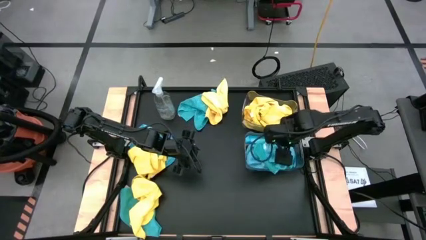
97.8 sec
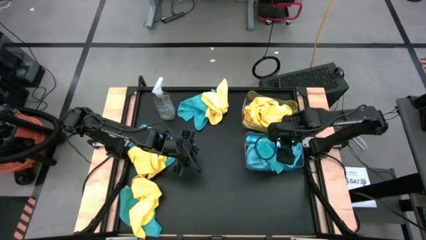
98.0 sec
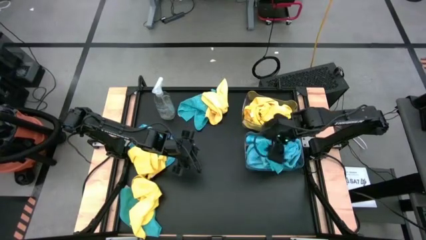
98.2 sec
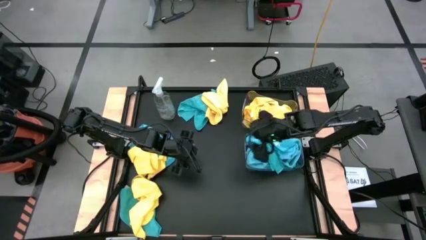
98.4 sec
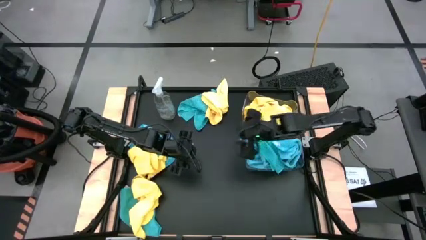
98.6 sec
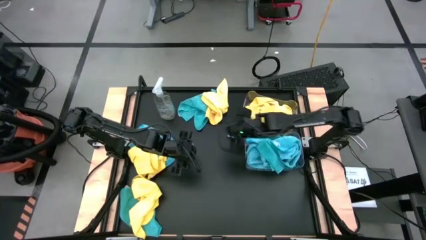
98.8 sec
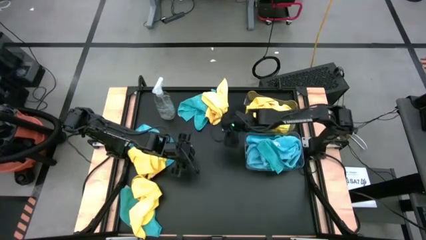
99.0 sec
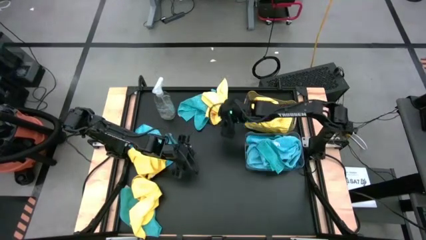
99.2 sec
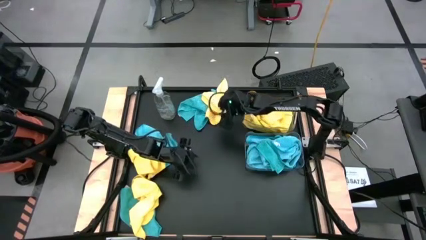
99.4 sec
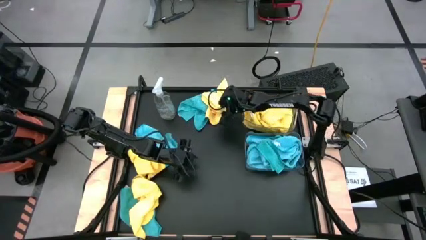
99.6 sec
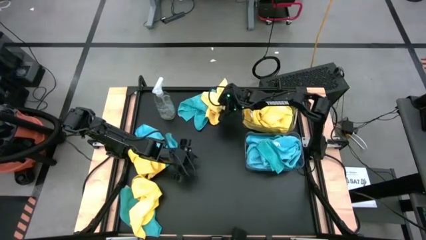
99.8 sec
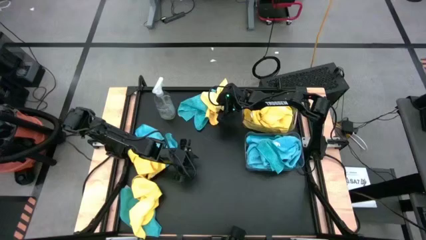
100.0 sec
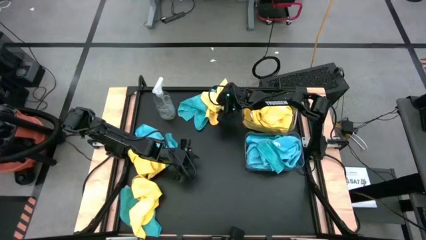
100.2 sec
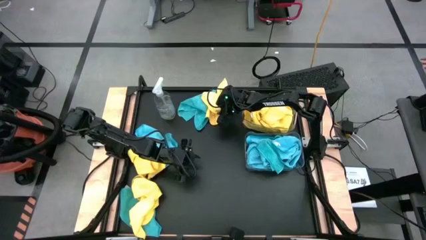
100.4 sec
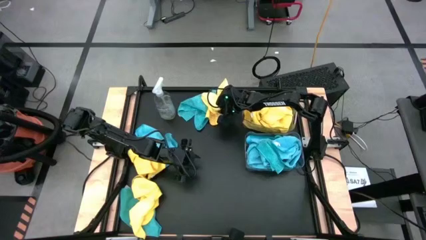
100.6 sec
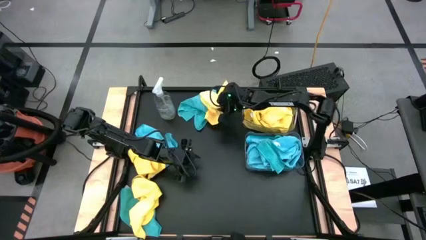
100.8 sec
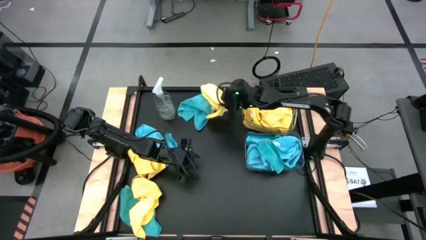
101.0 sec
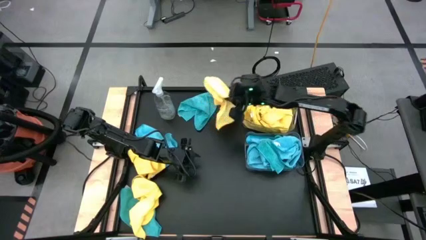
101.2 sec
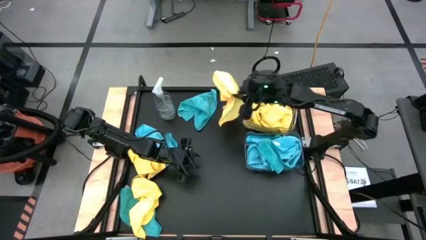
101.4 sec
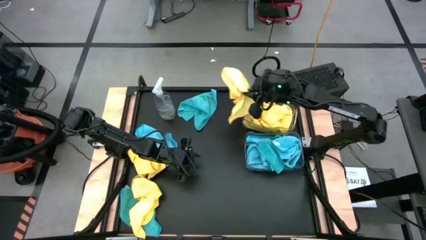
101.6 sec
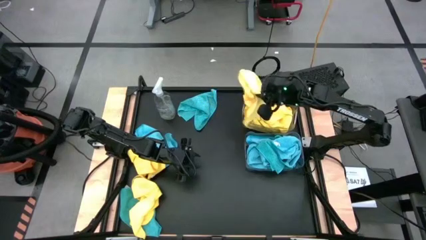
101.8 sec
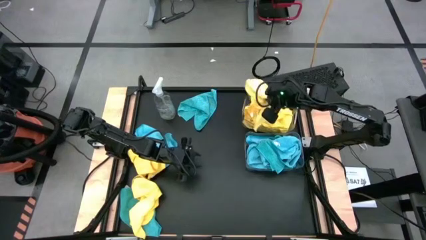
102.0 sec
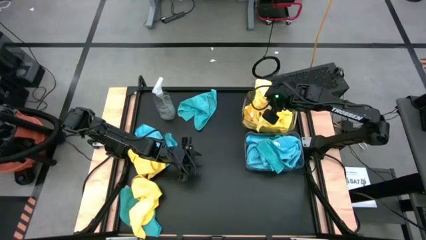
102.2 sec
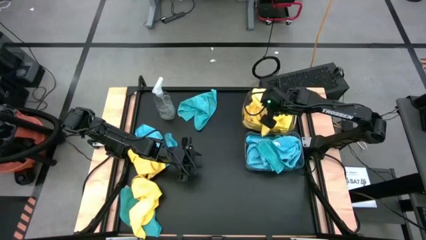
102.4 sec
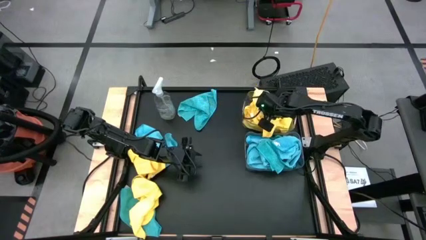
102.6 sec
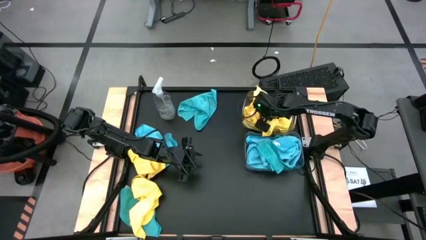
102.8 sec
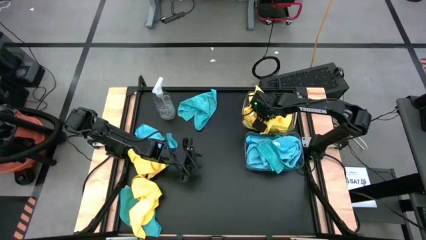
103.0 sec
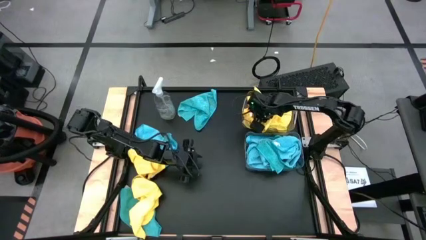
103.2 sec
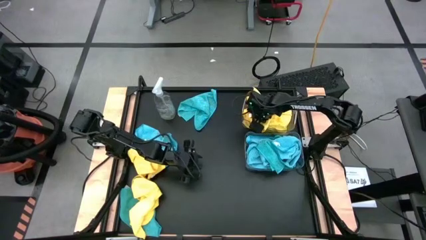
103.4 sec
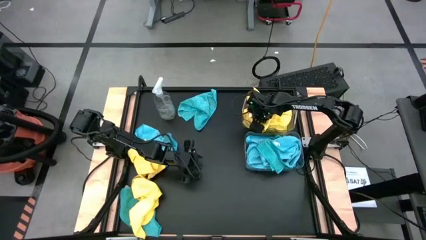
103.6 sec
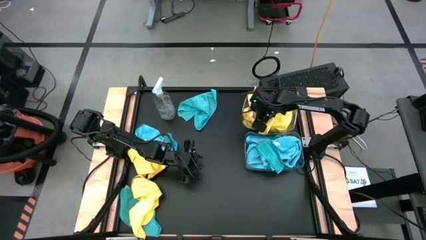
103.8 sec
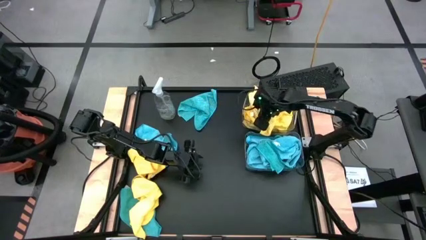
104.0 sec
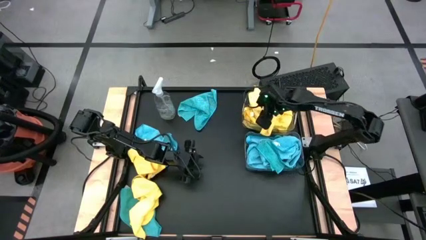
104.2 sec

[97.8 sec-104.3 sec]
Task: Sort microfiber towel by color & place in baskets
Put the yellow microfiber towel into the top transparent bin

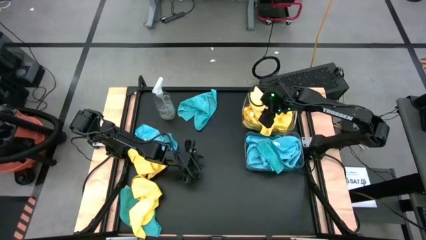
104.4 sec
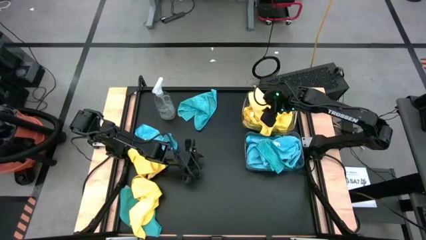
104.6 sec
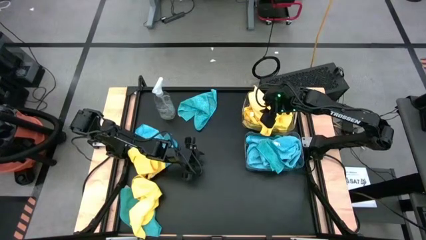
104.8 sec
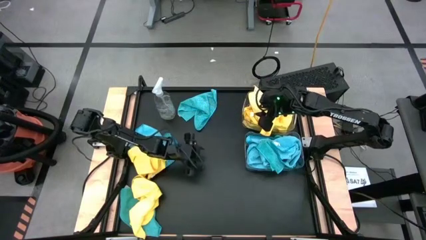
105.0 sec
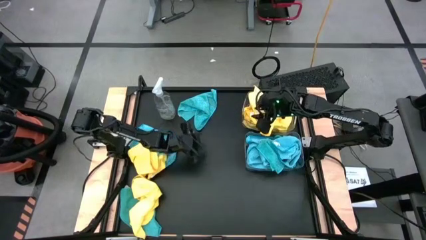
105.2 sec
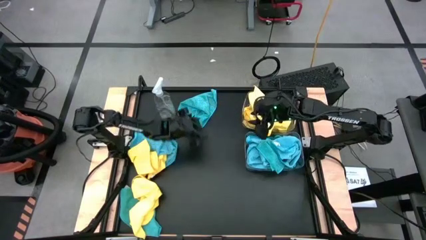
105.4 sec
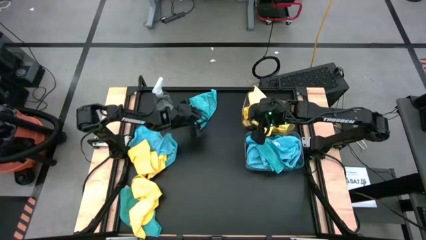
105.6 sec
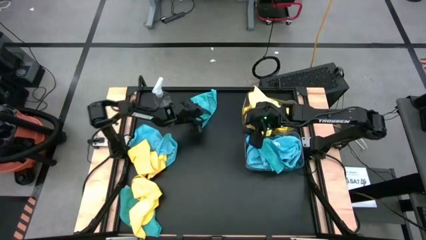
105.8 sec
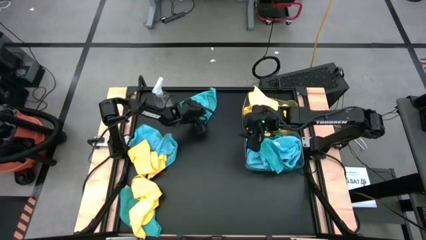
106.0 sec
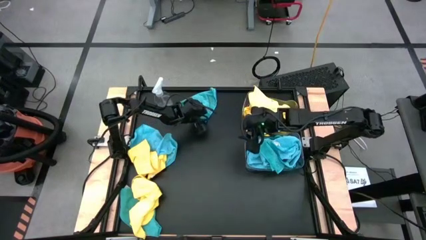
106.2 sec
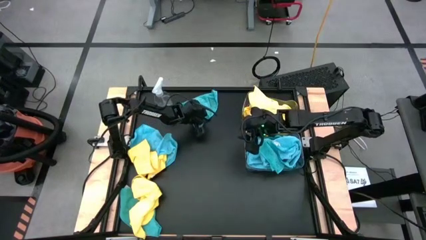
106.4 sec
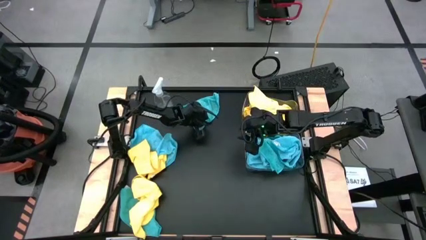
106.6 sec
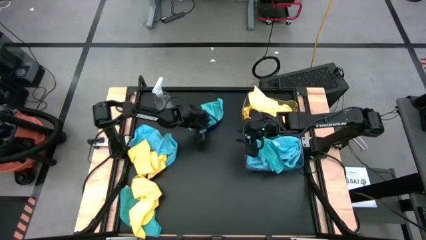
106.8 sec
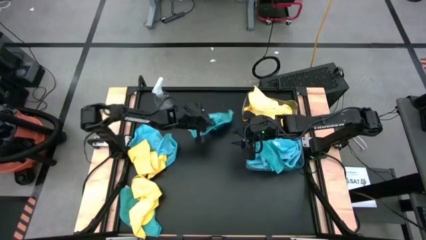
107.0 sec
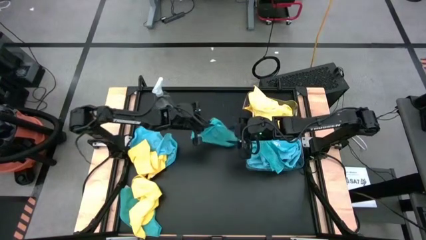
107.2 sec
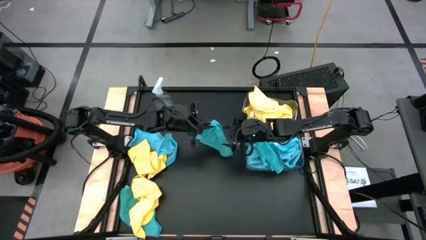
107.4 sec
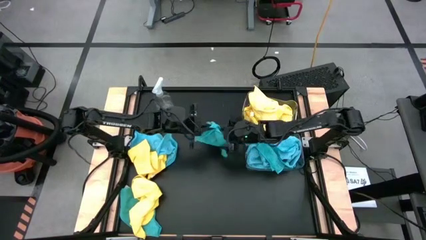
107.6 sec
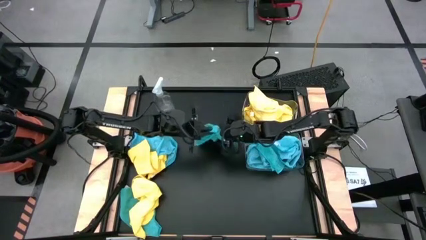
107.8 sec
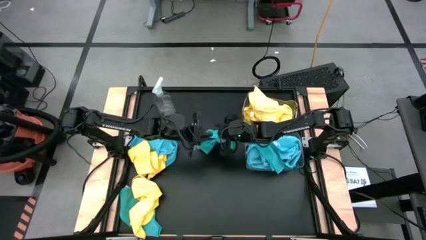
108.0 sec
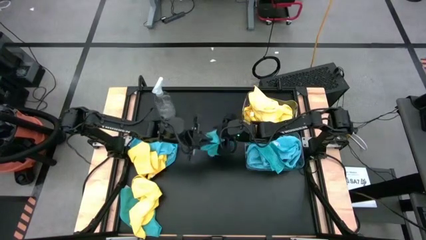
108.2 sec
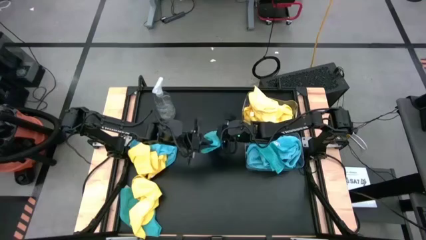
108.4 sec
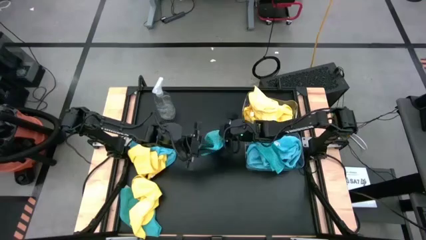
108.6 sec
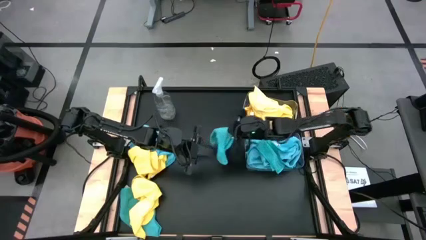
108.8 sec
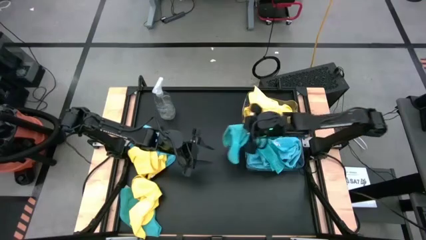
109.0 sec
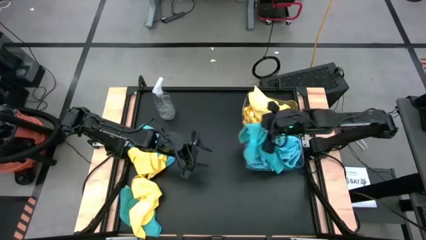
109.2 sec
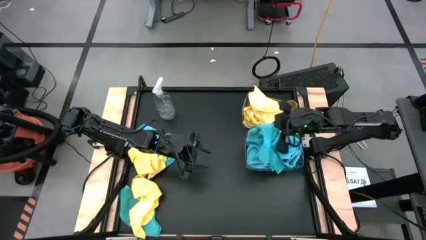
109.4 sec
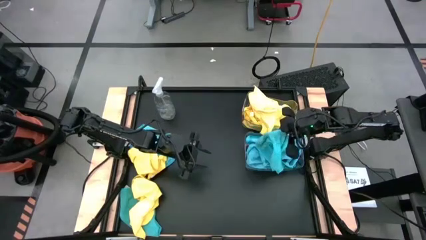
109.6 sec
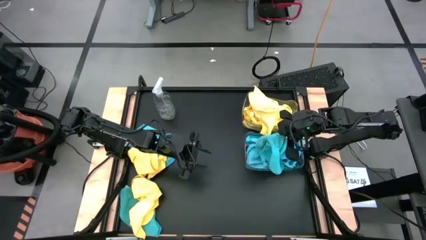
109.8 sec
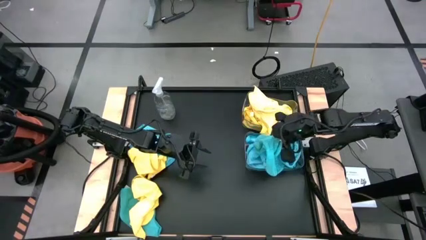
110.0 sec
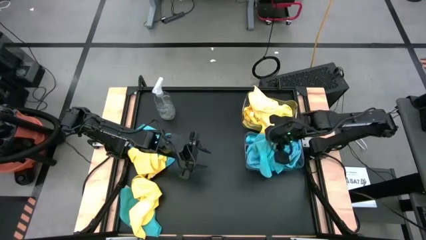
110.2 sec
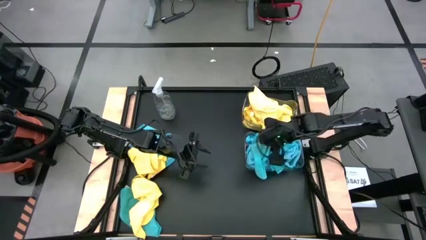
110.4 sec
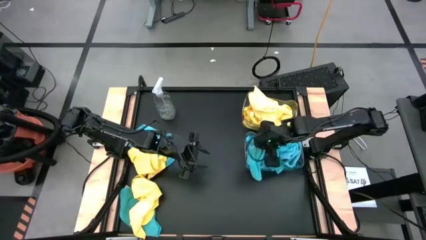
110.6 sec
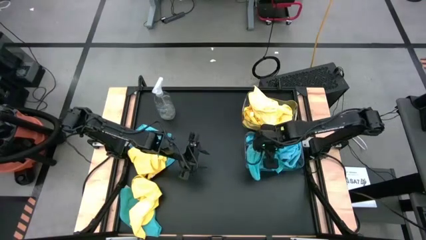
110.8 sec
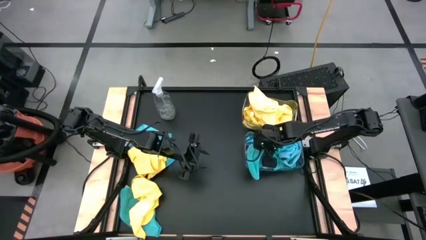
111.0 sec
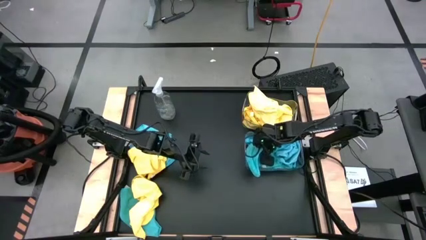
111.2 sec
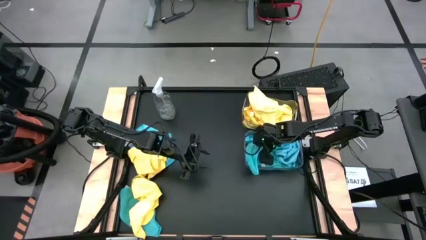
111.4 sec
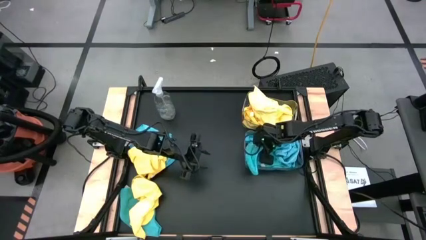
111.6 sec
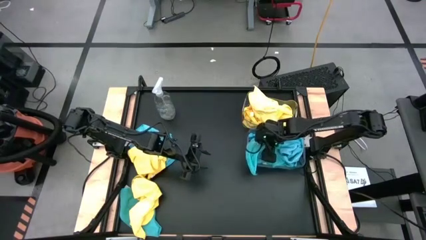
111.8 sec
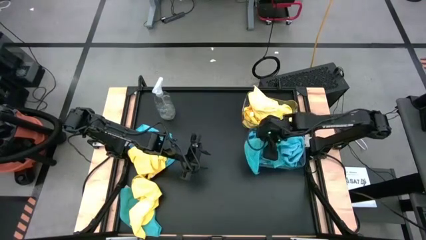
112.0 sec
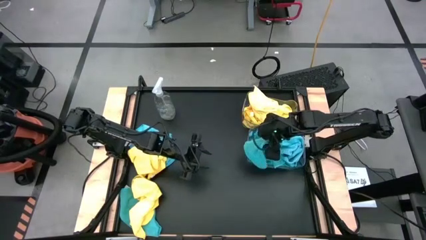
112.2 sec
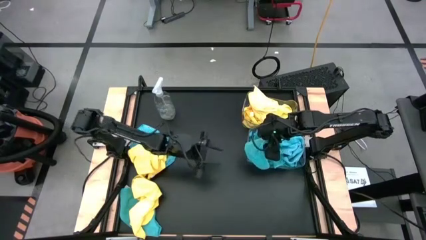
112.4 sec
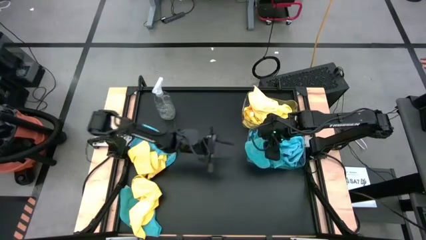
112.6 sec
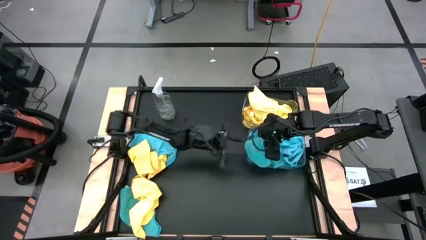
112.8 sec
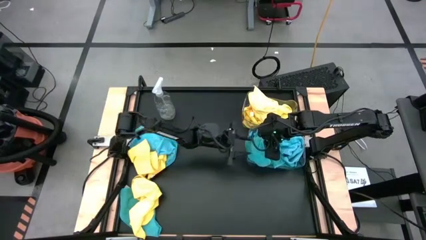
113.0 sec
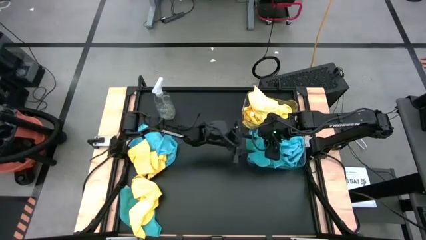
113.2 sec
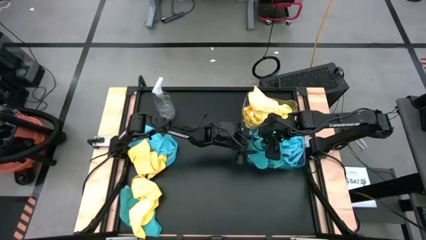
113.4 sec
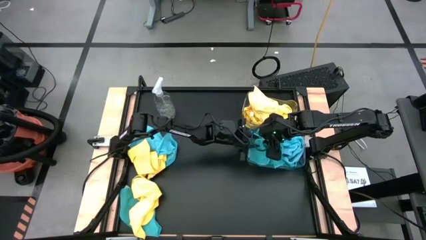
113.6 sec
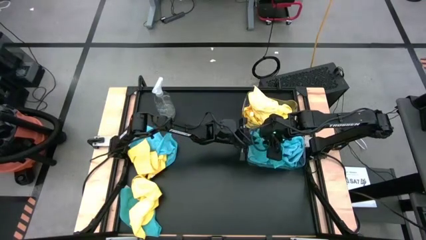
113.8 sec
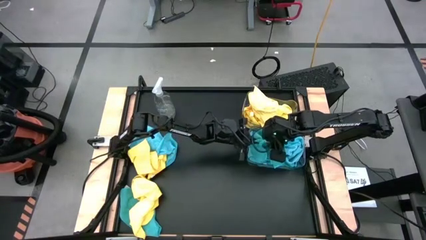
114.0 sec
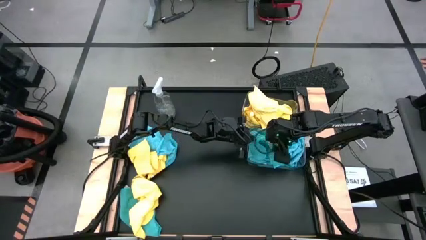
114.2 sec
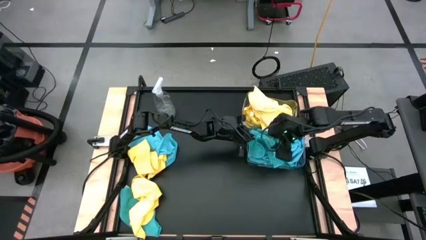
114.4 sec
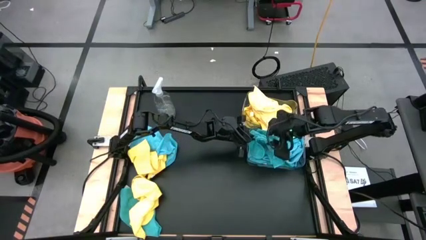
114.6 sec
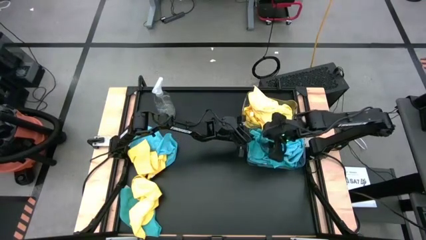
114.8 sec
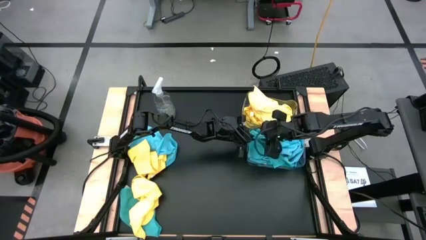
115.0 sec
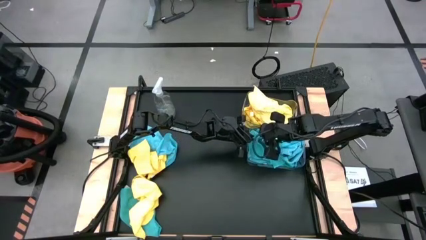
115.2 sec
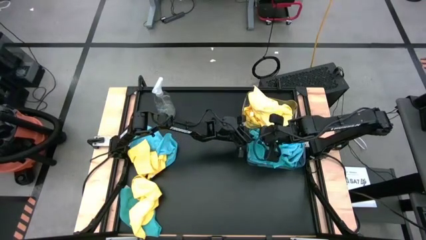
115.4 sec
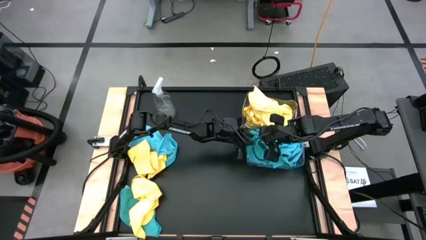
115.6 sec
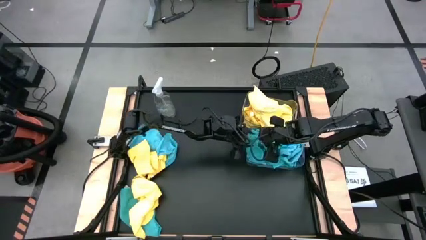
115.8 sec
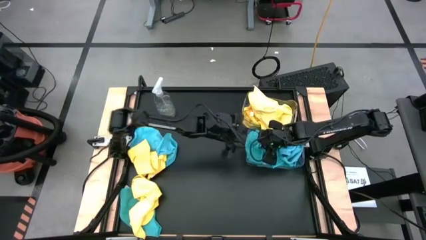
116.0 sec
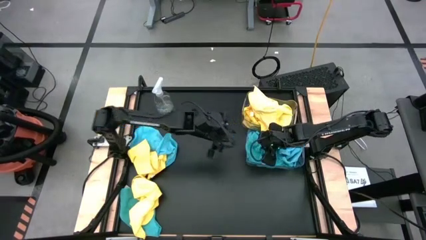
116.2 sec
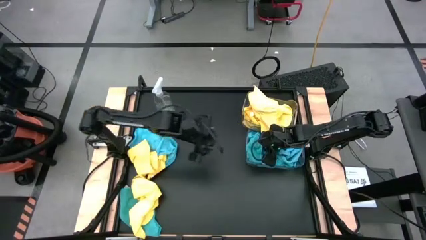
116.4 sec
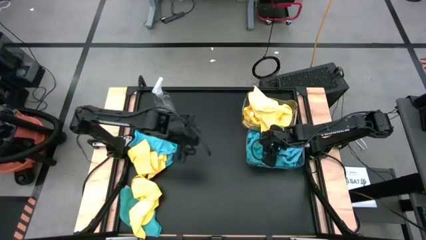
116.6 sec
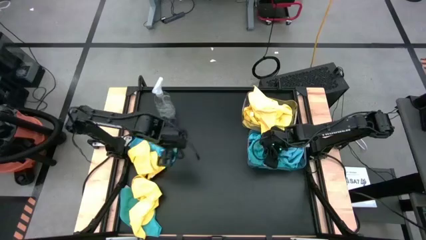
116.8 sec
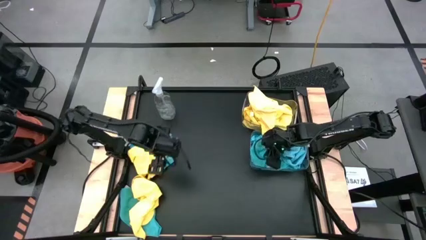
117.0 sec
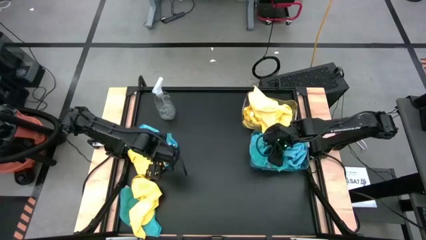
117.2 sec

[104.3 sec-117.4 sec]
Put the blue microfiber towel into the bottom transparent bin
